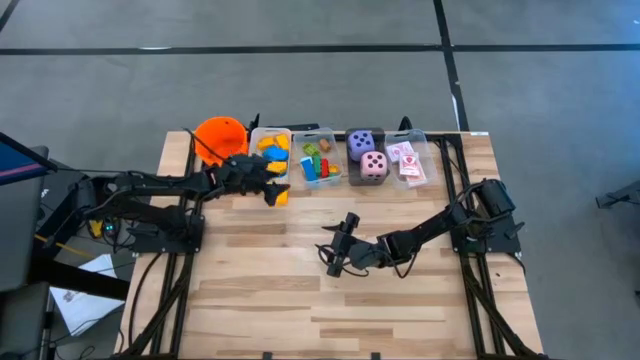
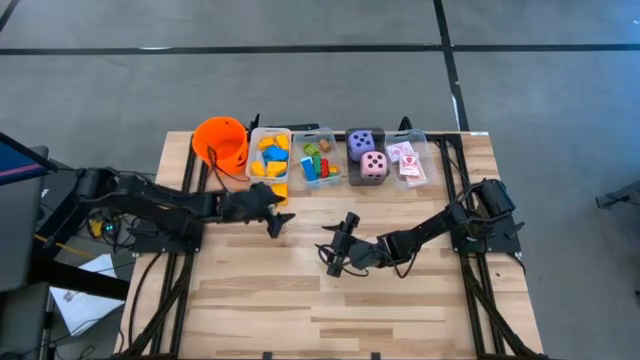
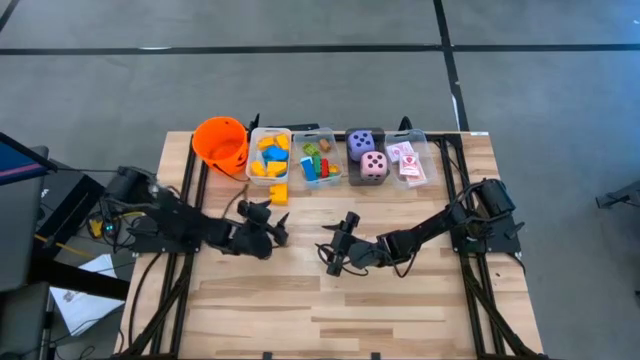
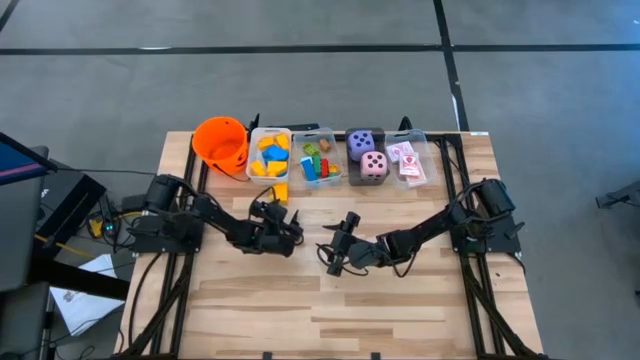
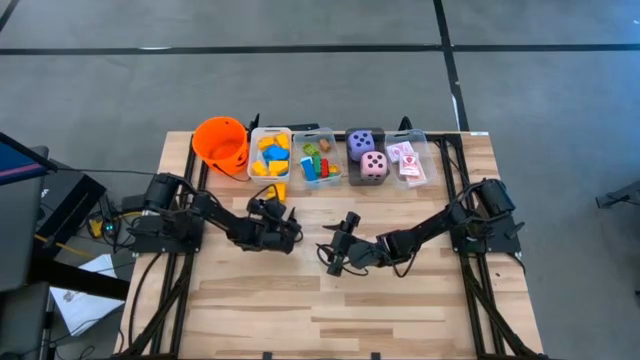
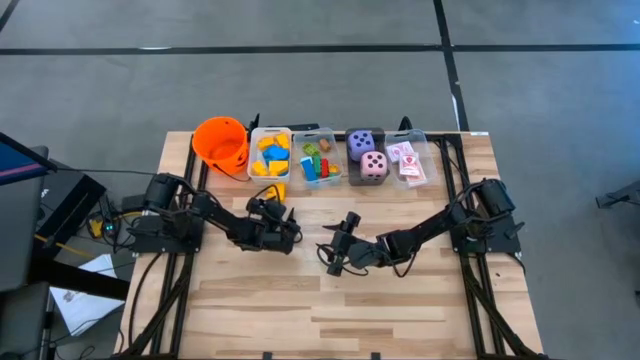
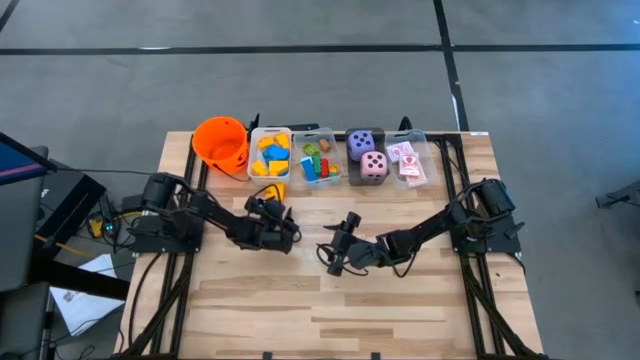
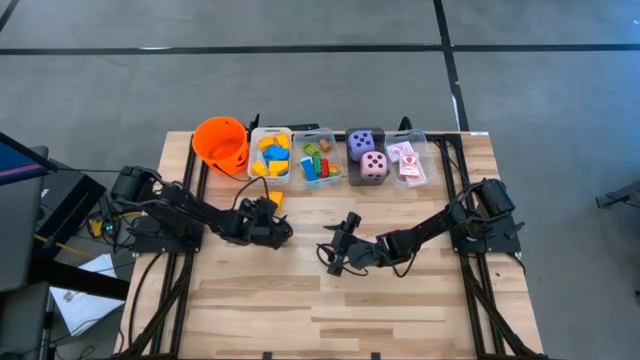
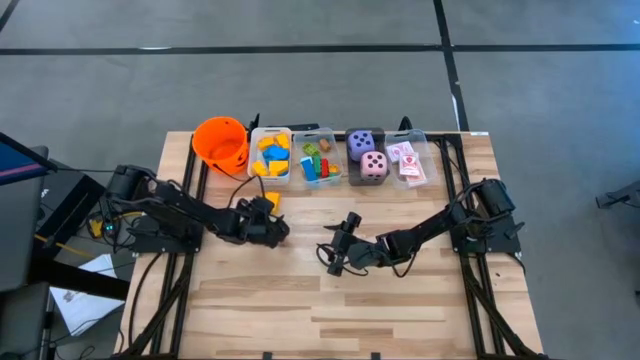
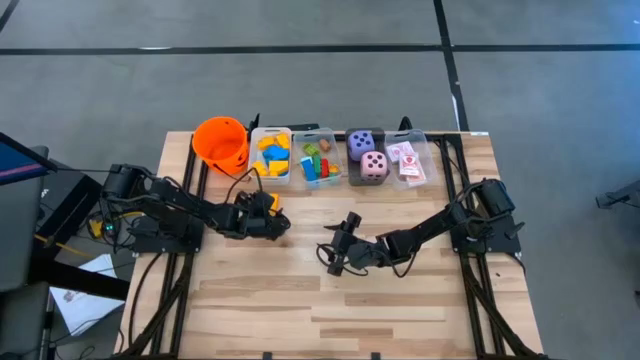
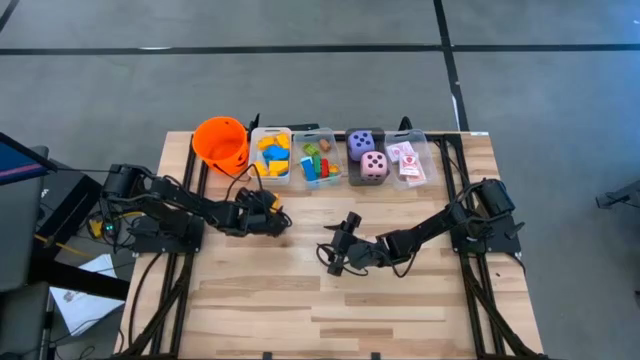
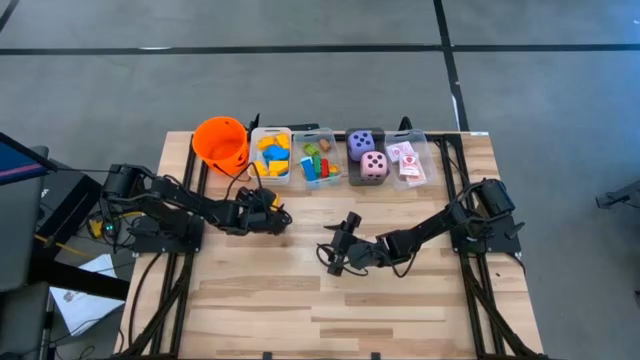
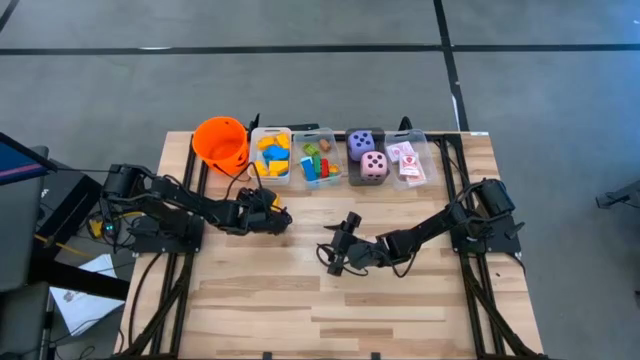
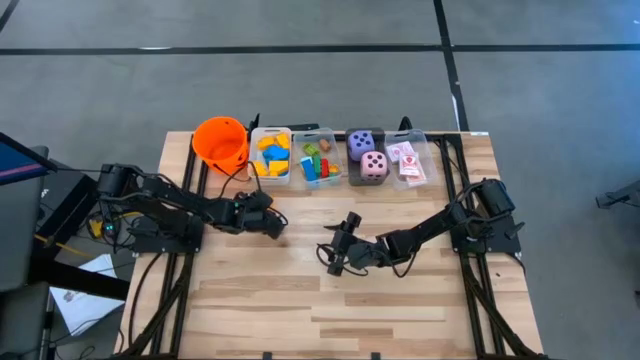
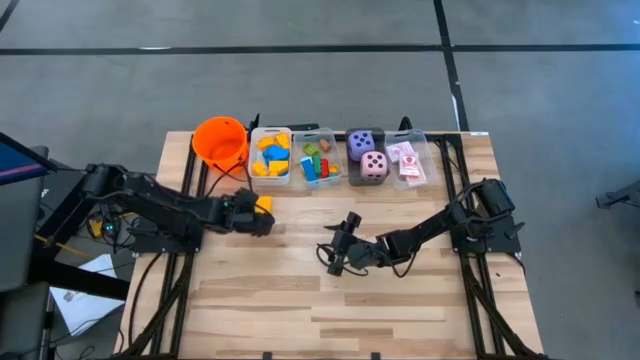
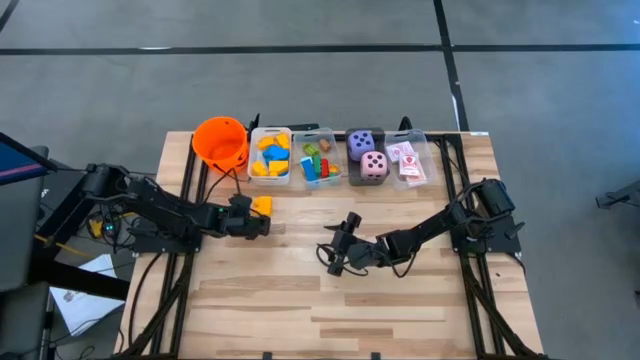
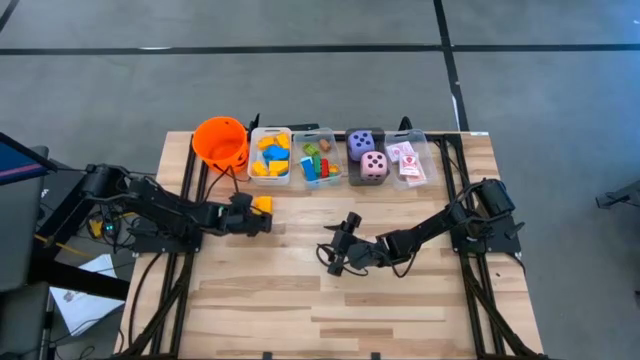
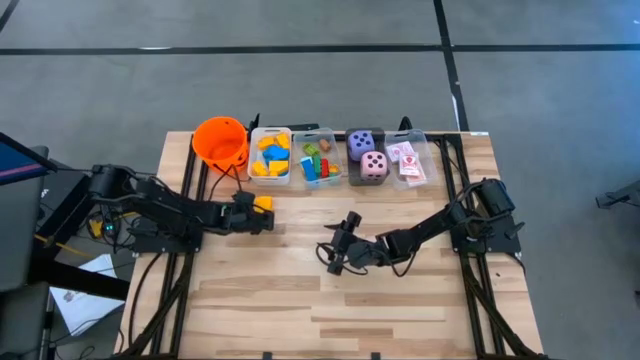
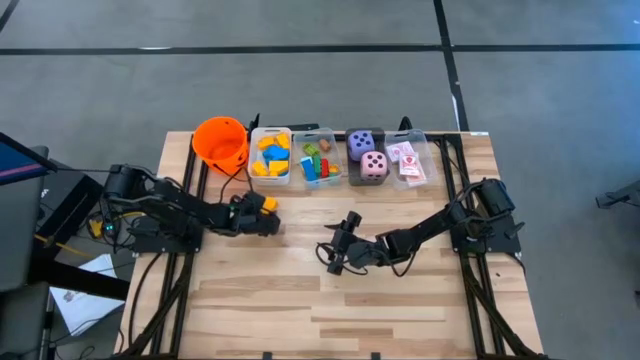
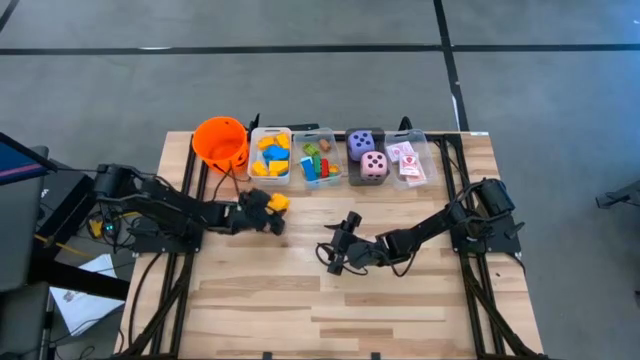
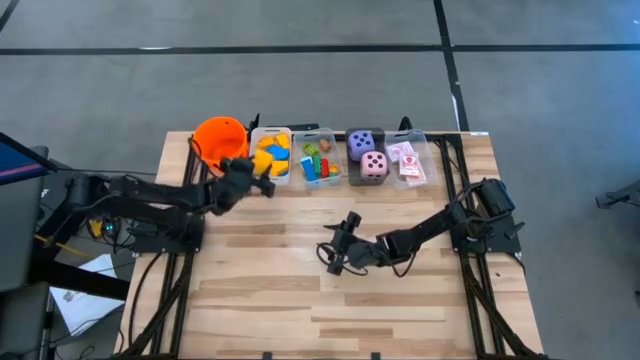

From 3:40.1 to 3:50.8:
Task: Pick & Place Toys
Put the large yellow game piece into the white bin

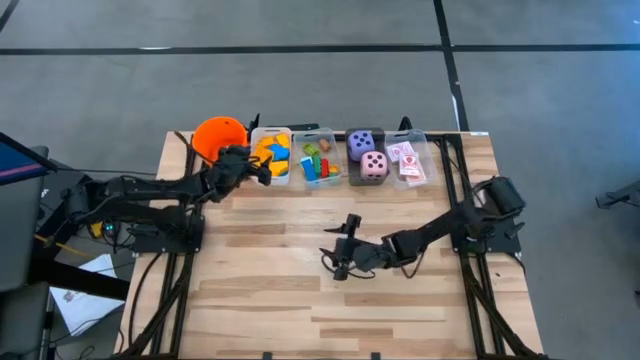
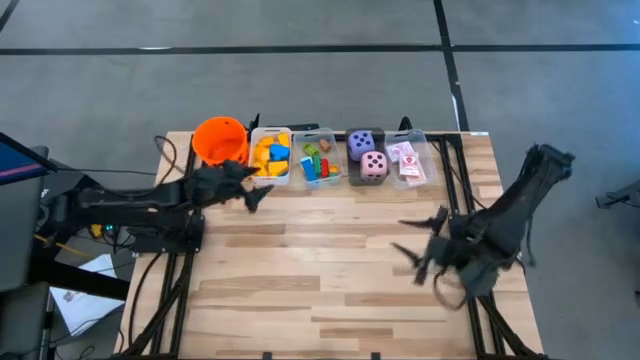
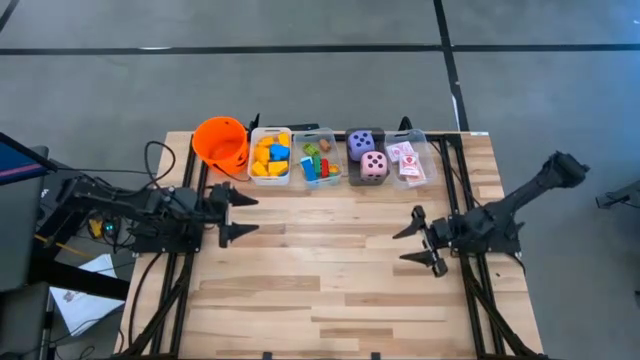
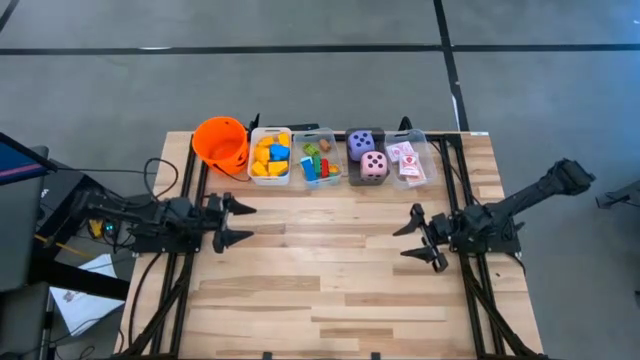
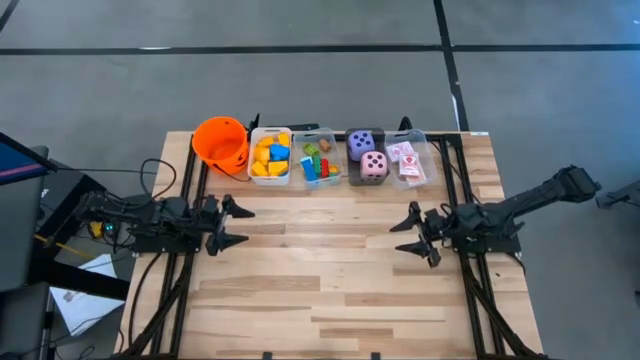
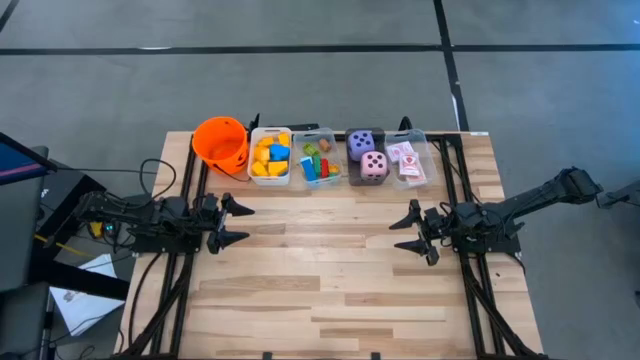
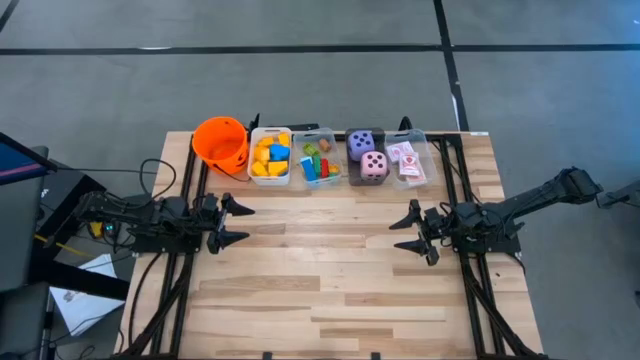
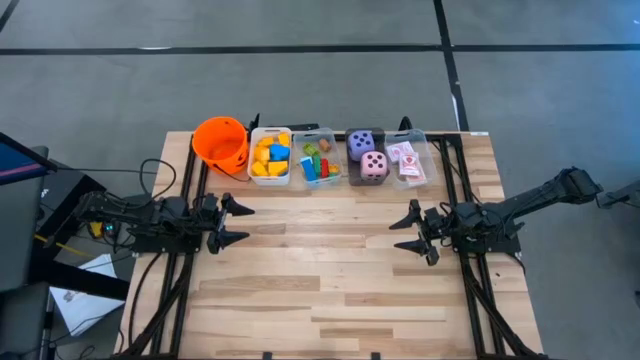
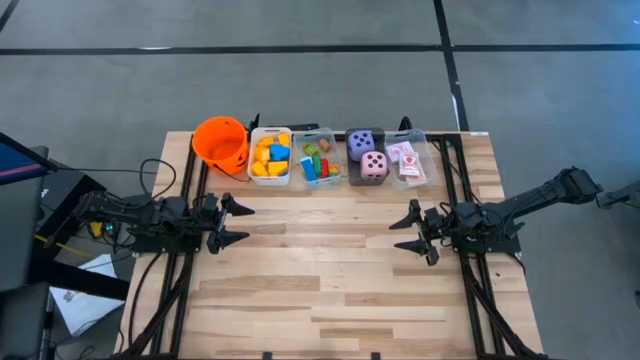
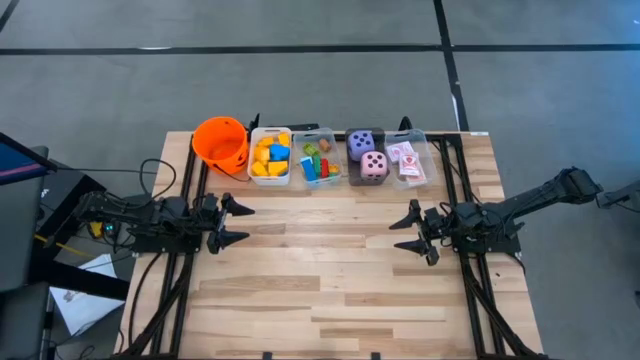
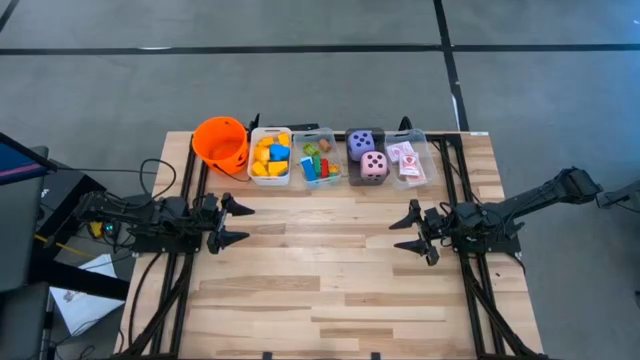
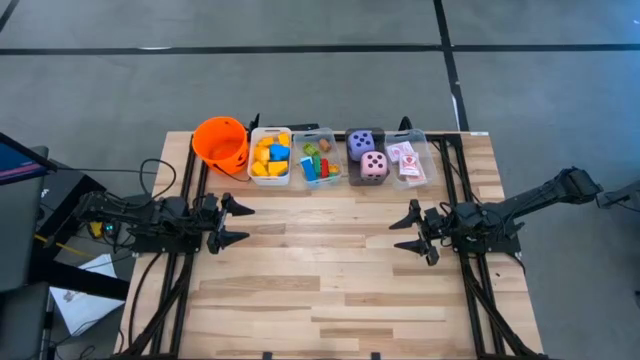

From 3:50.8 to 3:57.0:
Return To Home Position

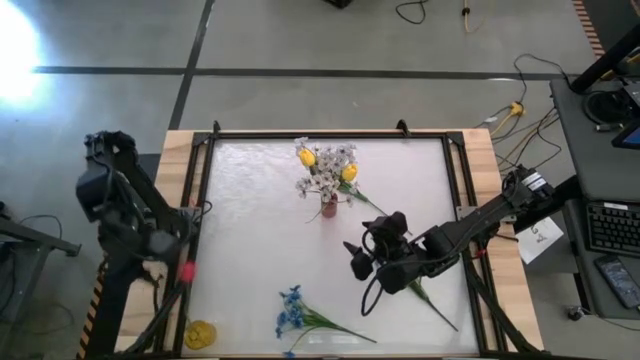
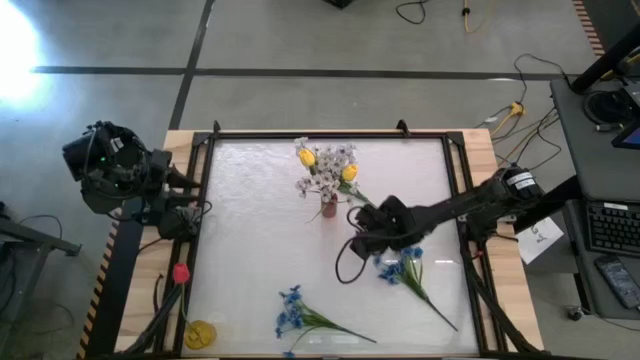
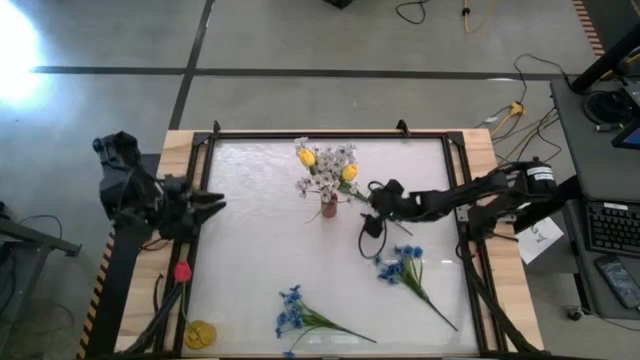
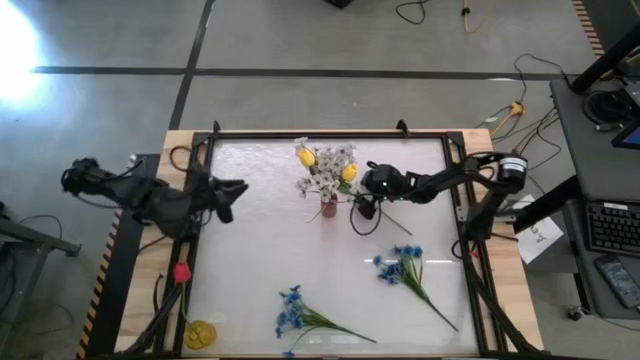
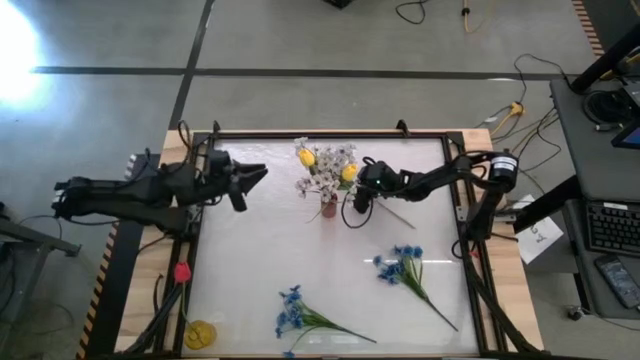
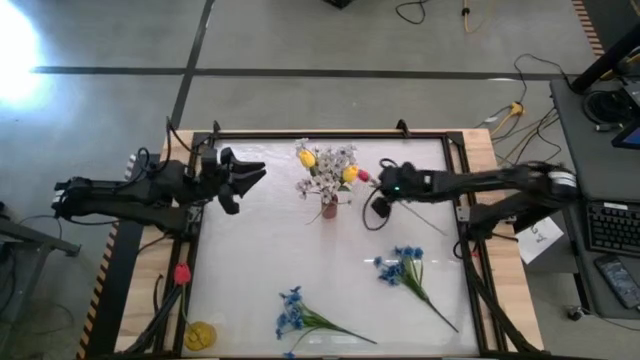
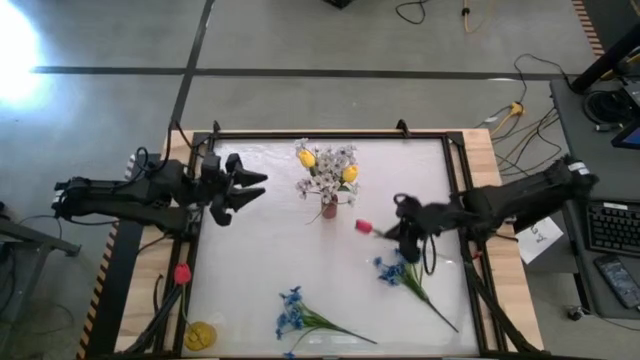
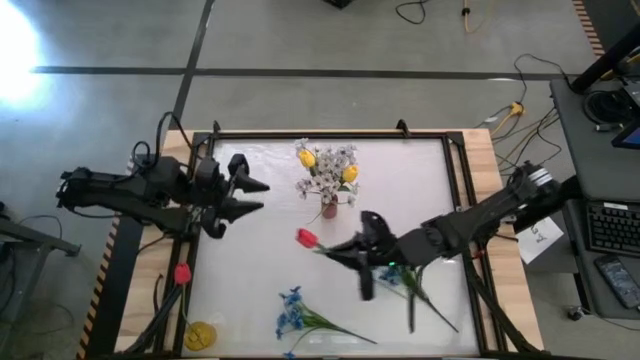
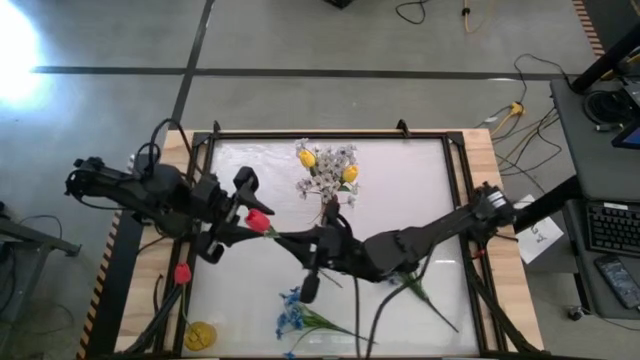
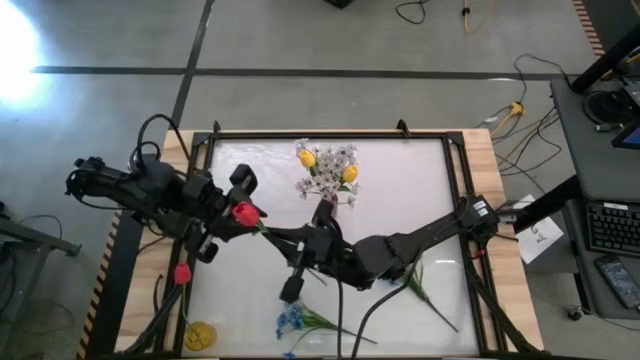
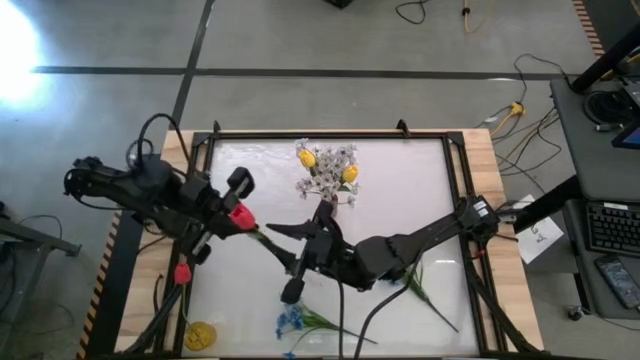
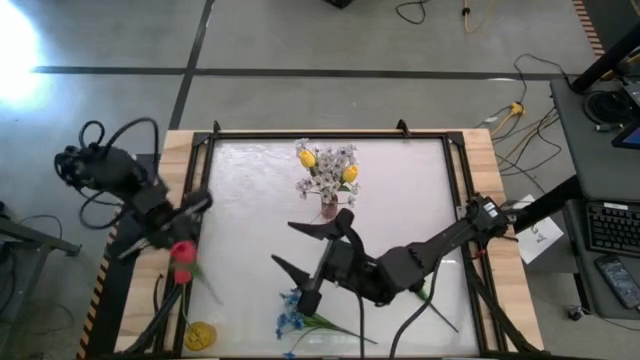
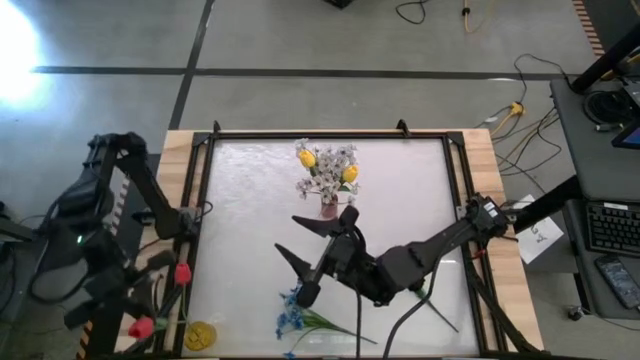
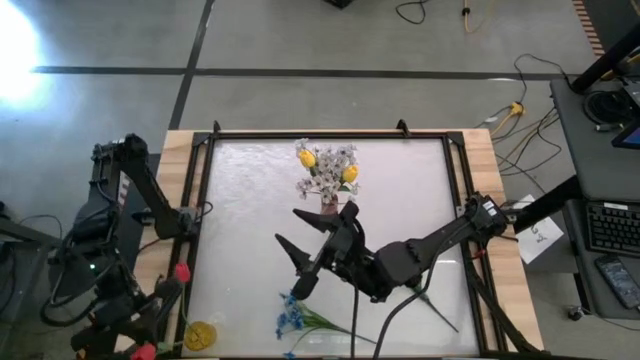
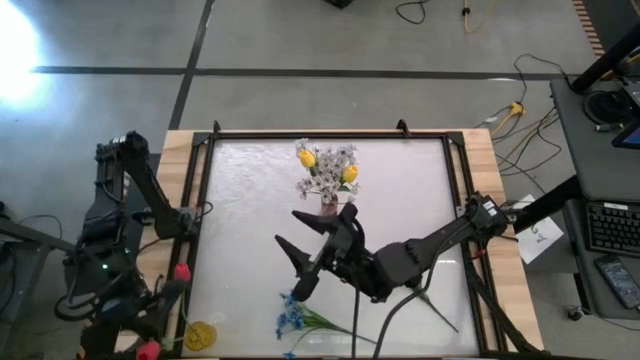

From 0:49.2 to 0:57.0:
Task: Sort flowers into vase by color
Put the red tulip into the yellow flower vase
